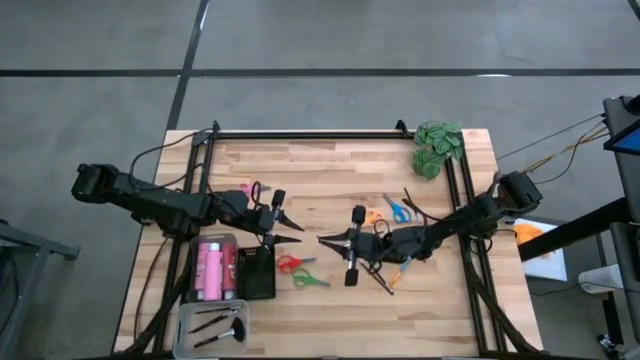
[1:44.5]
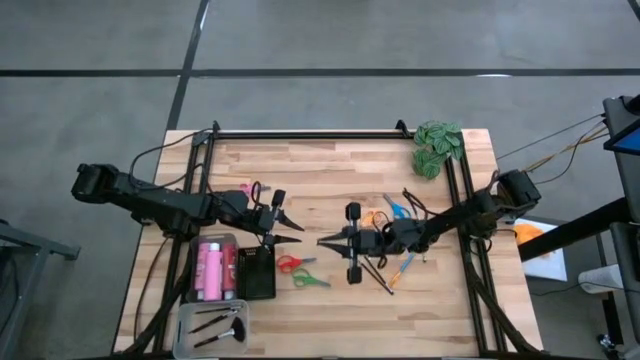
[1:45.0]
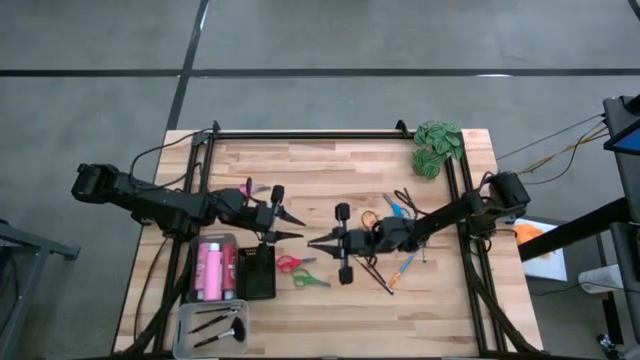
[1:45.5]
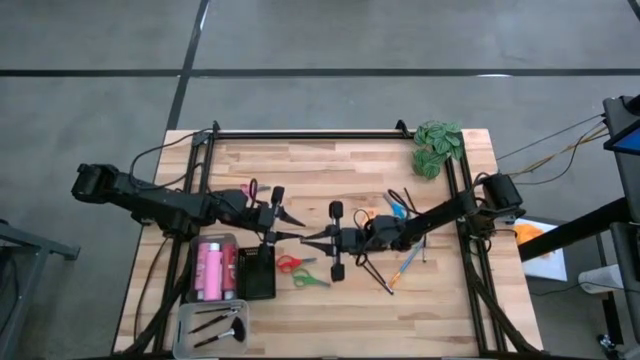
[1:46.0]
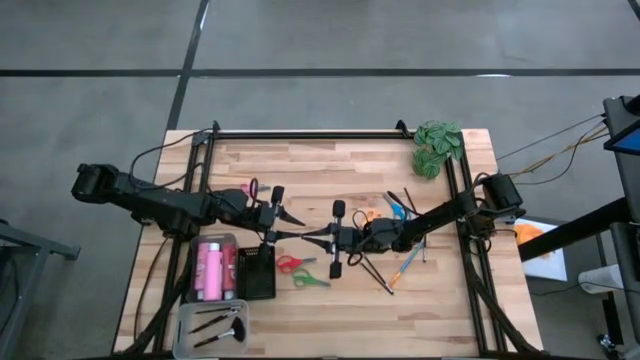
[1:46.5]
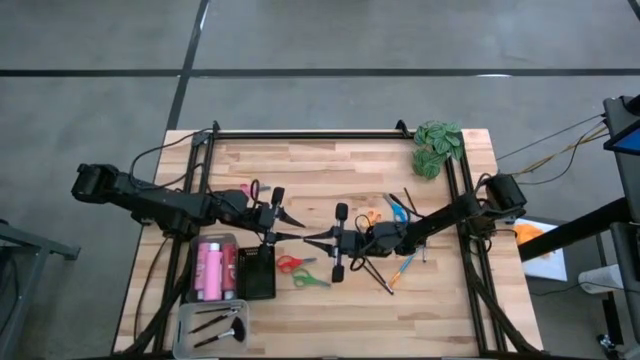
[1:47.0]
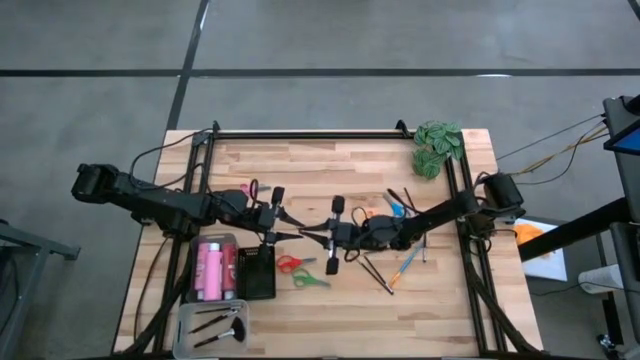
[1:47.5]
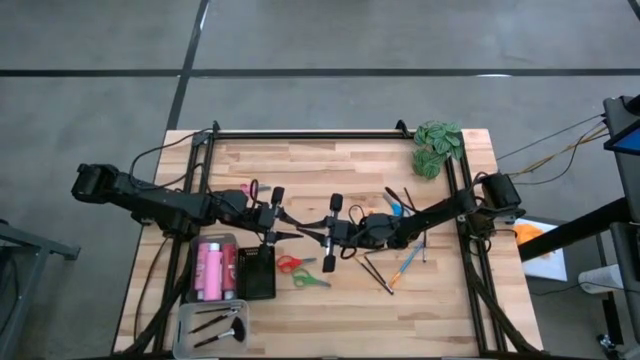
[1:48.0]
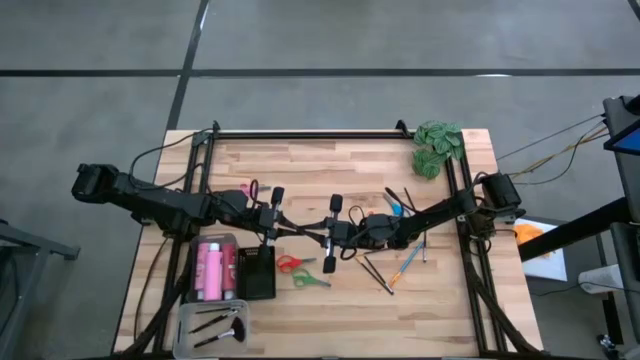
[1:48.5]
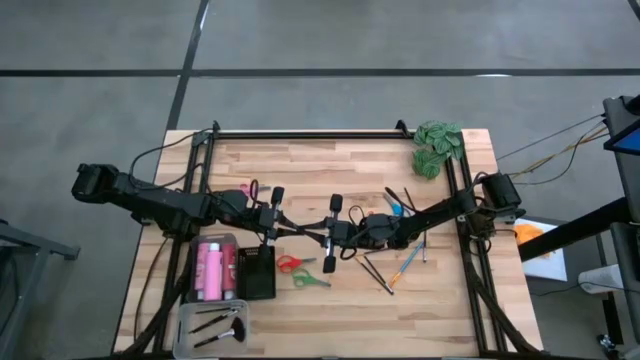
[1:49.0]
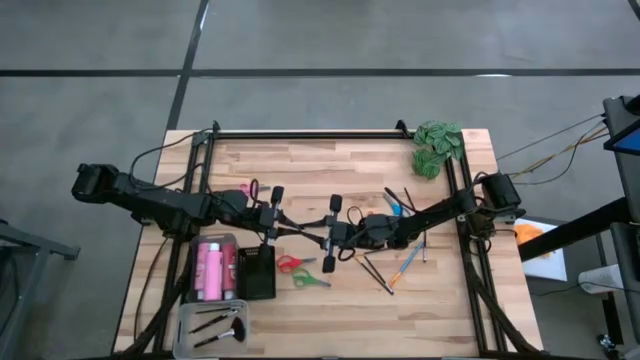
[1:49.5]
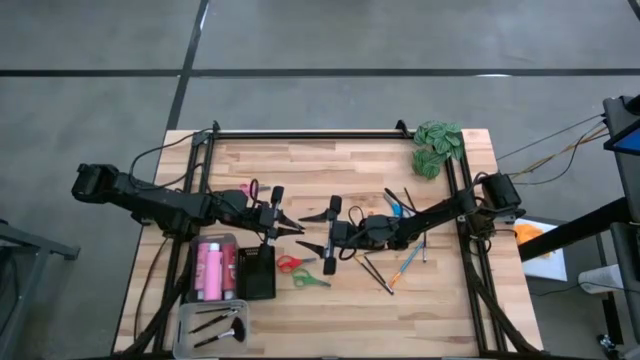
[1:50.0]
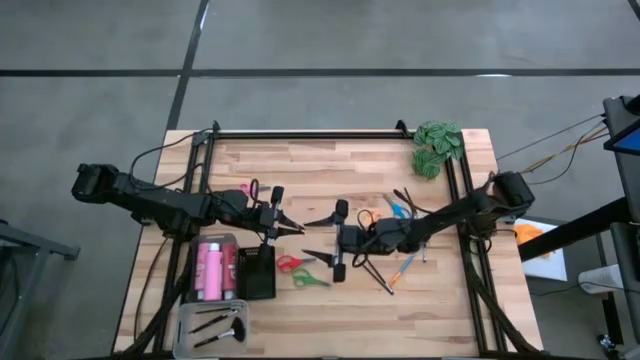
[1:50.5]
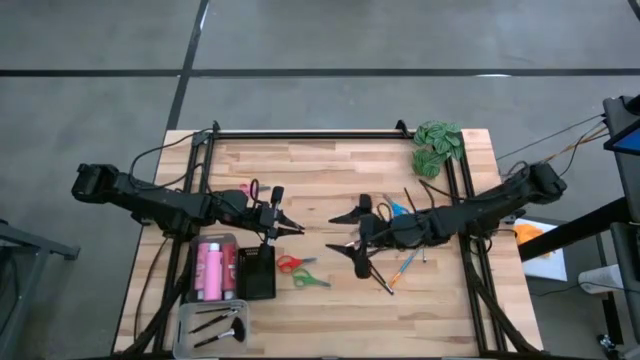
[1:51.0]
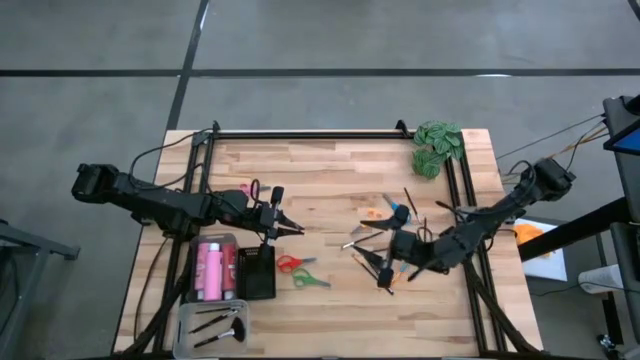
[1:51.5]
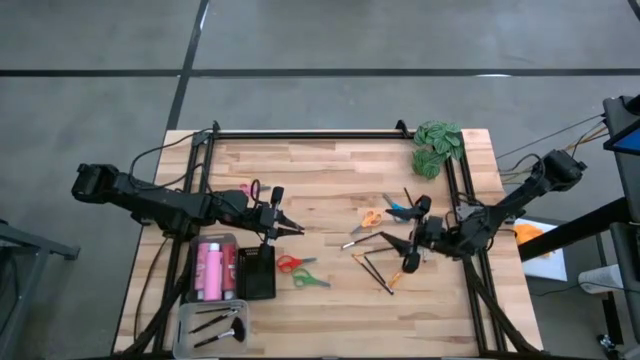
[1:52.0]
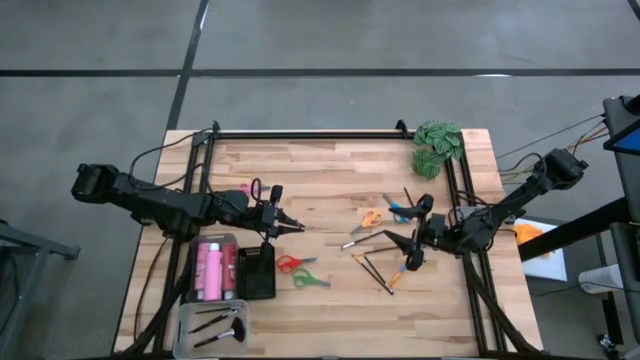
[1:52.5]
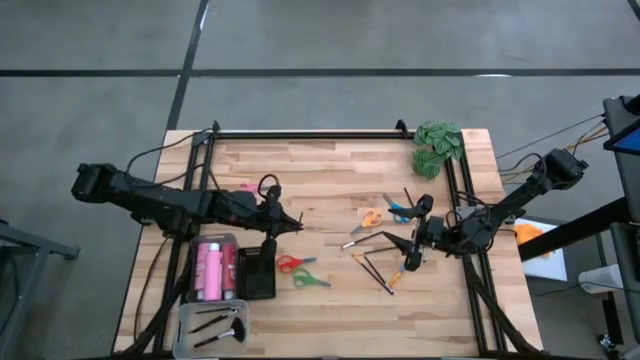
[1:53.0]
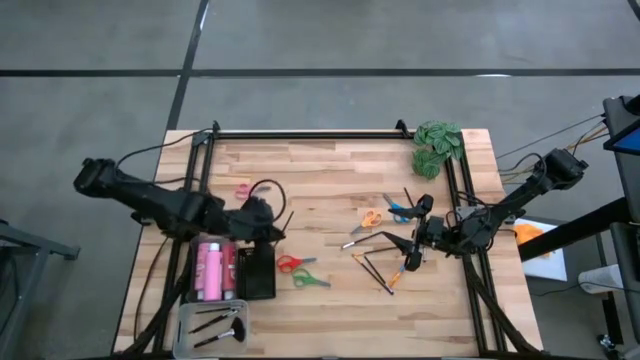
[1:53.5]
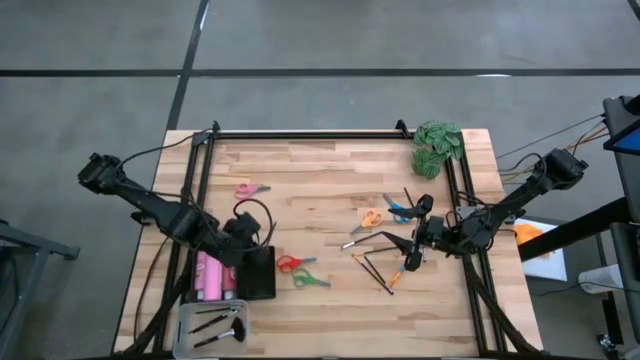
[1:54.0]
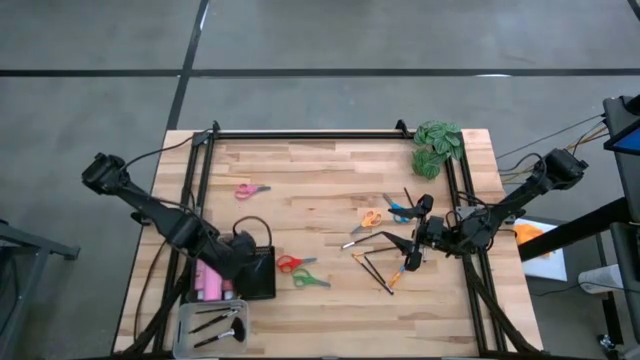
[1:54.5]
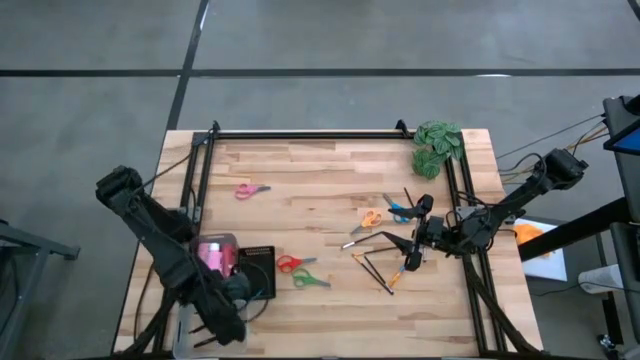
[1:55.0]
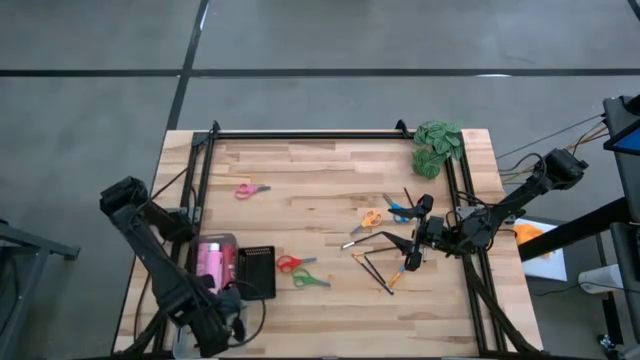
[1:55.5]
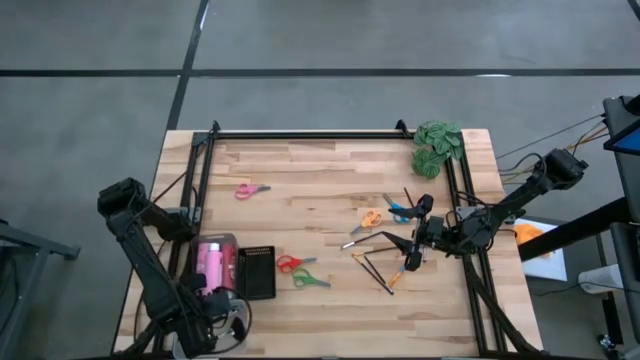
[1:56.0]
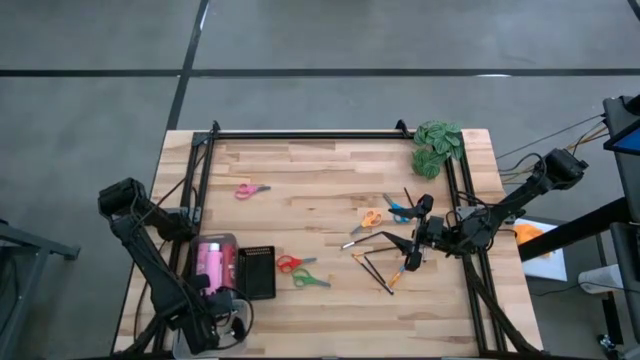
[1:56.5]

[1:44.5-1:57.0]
Task: Pick & Place Paint Supplies
Put the gold paint brush into the transparent bin

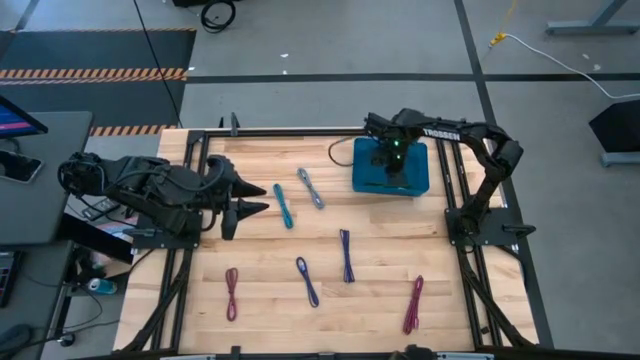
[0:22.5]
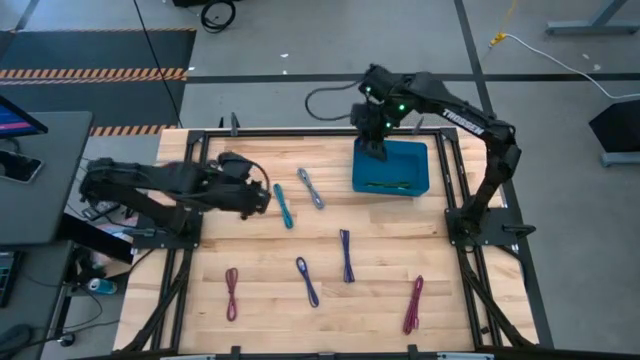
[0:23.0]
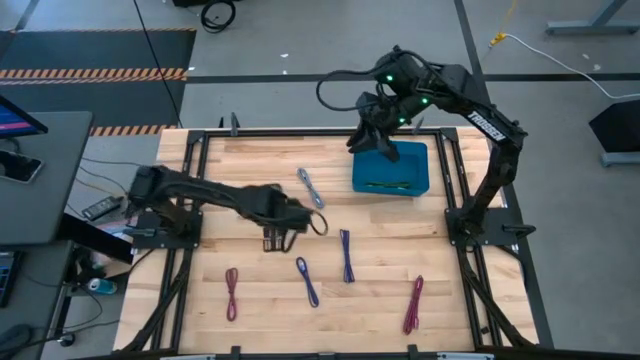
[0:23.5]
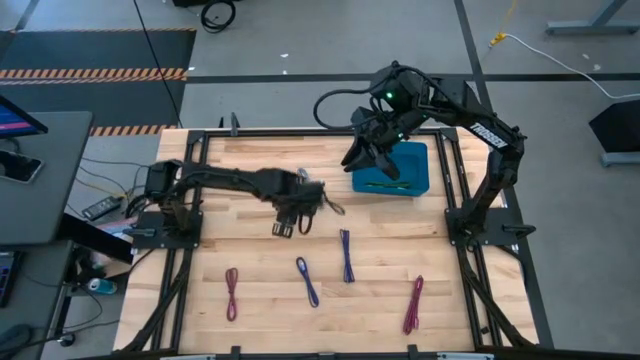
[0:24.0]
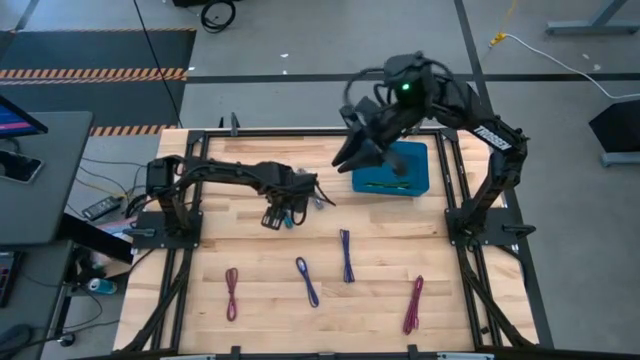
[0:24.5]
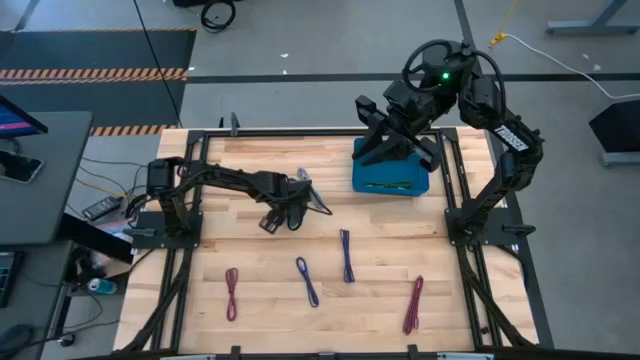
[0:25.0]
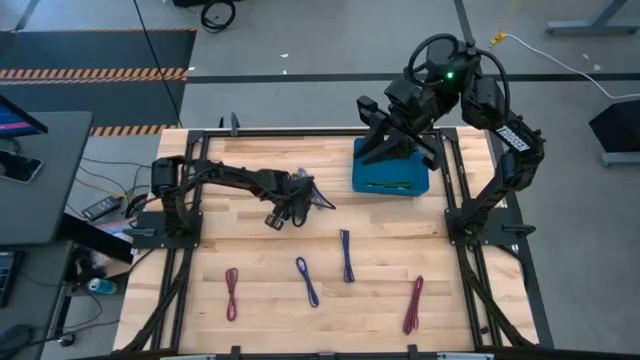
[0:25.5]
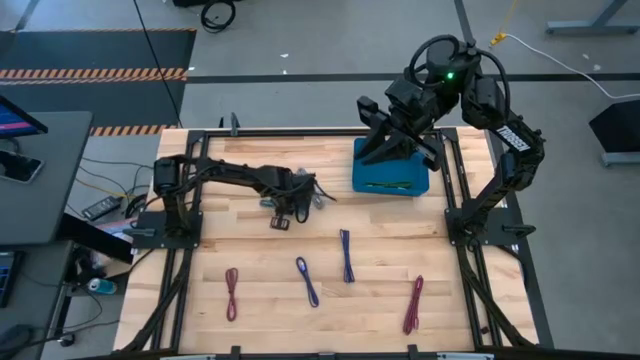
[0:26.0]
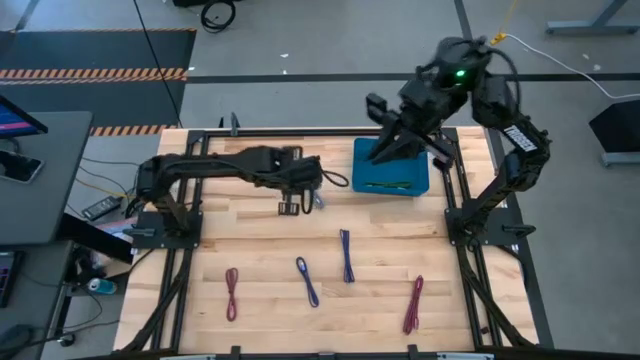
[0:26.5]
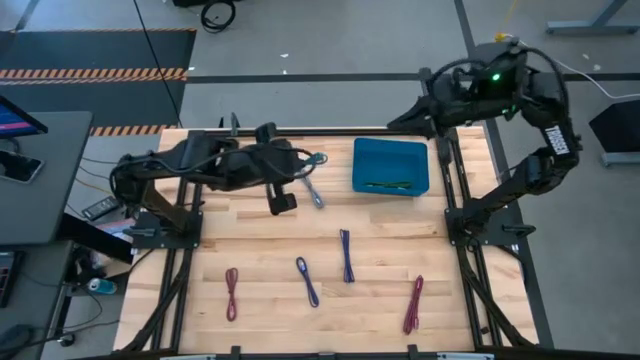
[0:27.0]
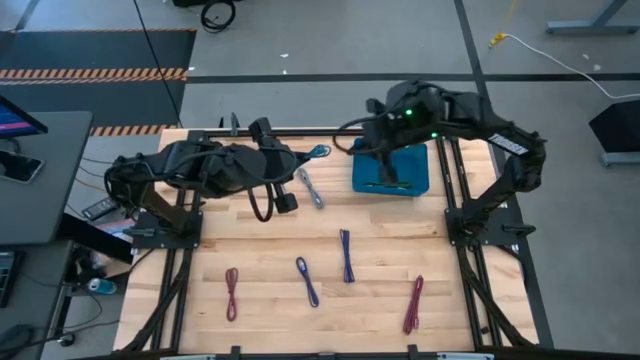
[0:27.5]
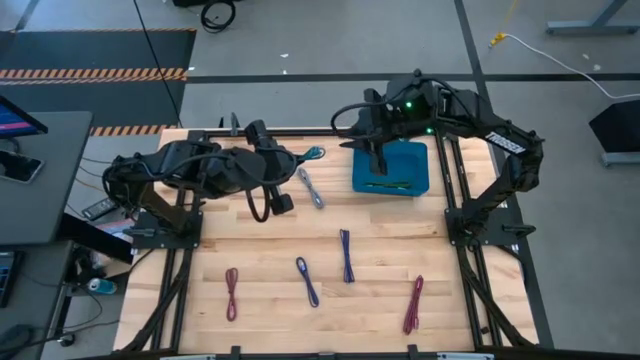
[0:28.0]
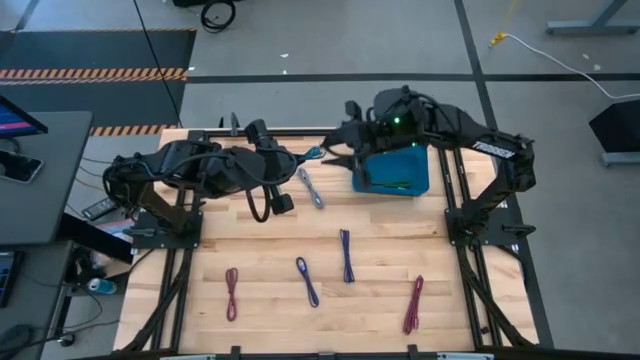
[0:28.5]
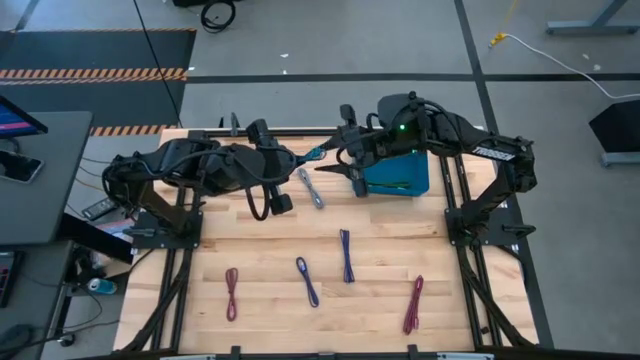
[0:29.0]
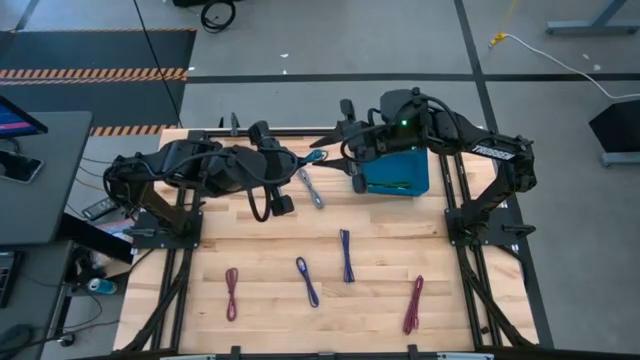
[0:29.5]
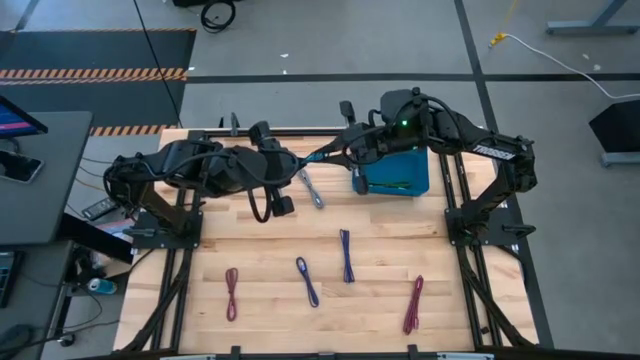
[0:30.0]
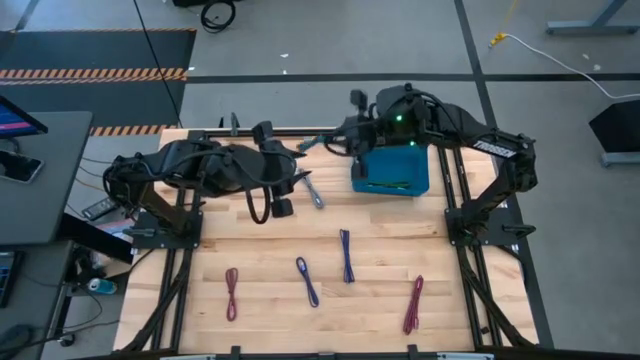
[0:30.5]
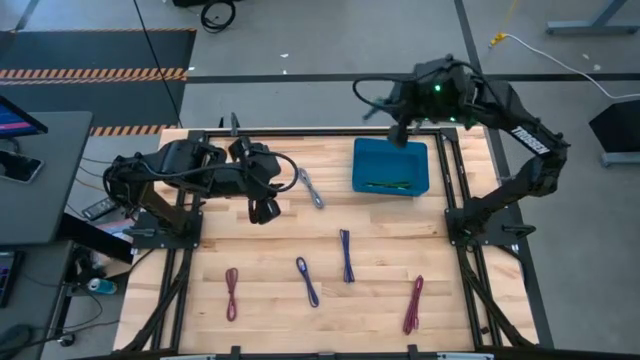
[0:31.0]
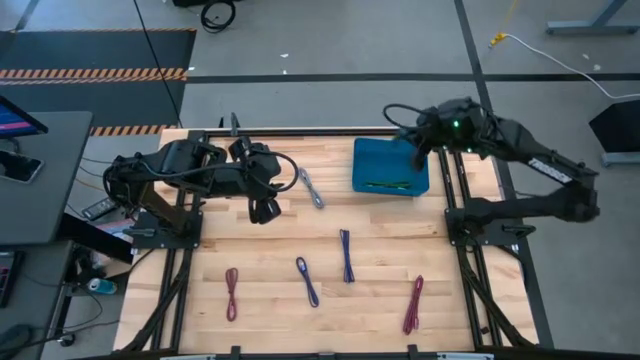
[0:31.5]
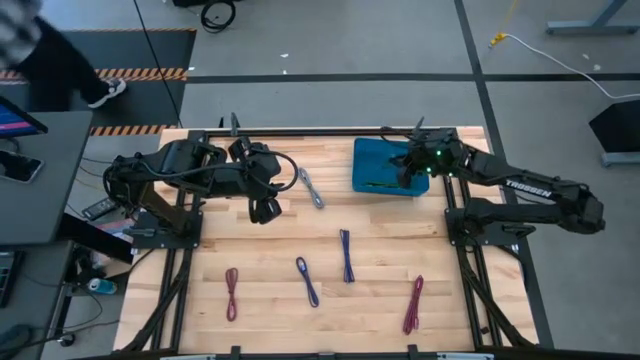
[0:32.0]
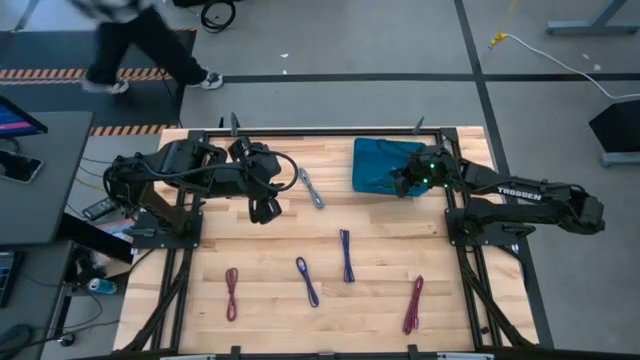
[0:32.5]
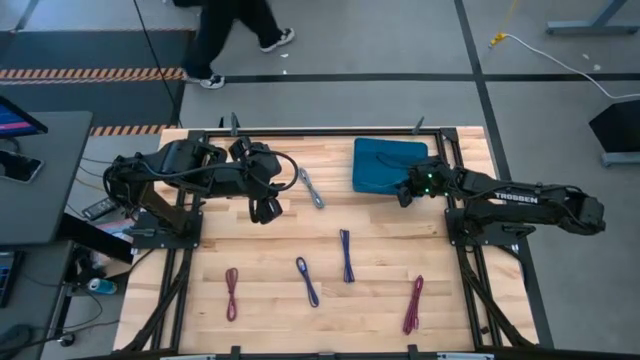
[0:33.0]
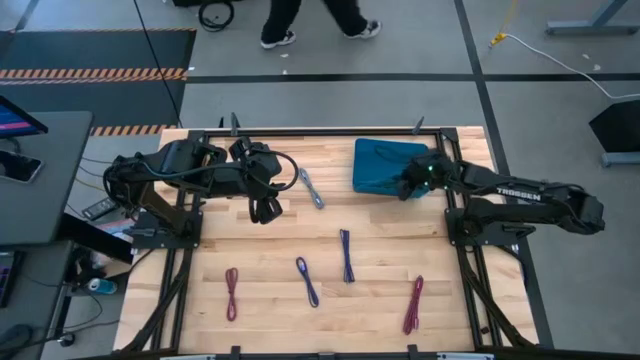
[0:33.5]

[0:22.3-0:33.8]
Task: Pick and place USB-C Cables
Put the black blue charger cable into the blue bin
